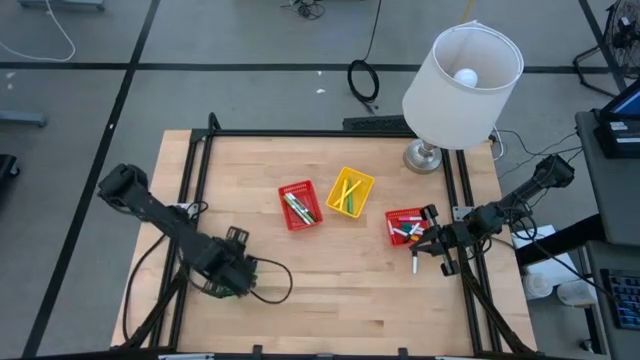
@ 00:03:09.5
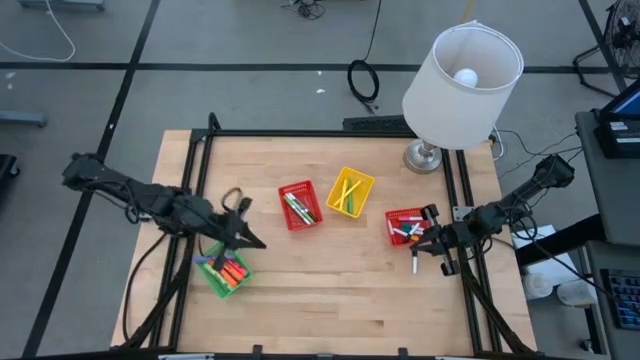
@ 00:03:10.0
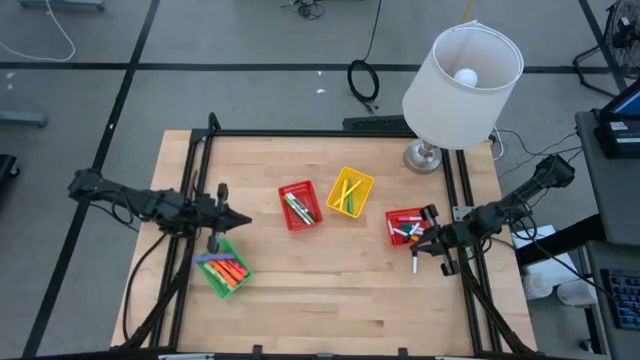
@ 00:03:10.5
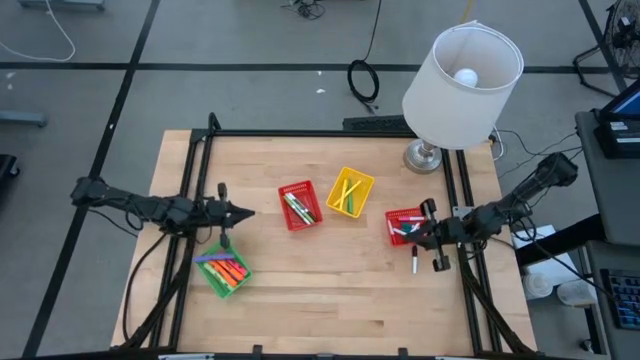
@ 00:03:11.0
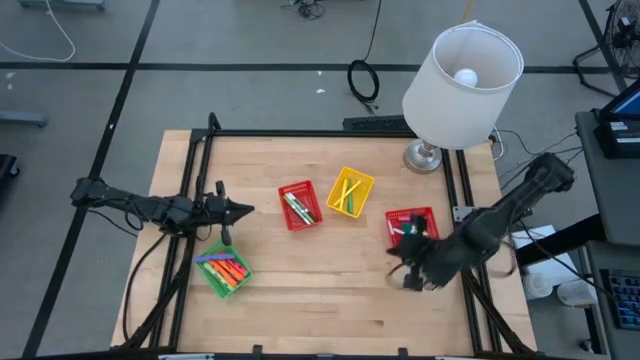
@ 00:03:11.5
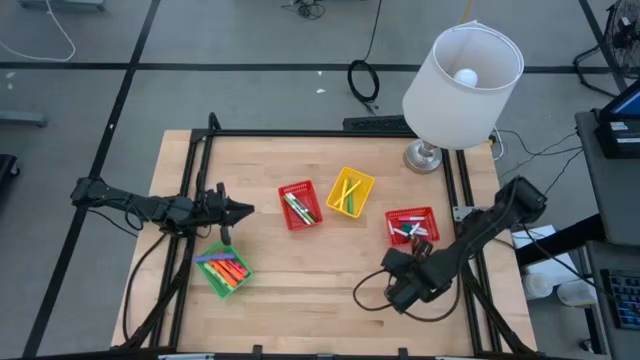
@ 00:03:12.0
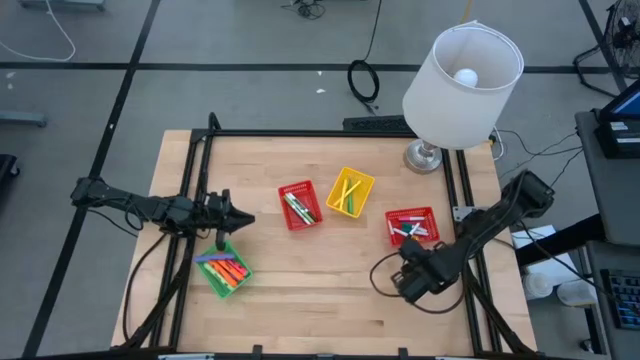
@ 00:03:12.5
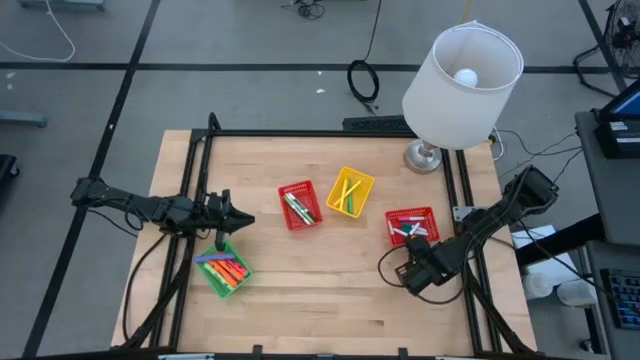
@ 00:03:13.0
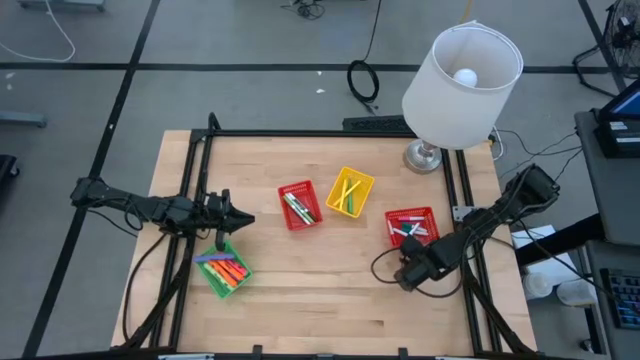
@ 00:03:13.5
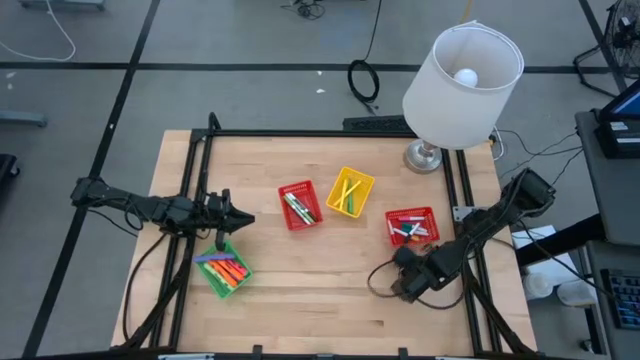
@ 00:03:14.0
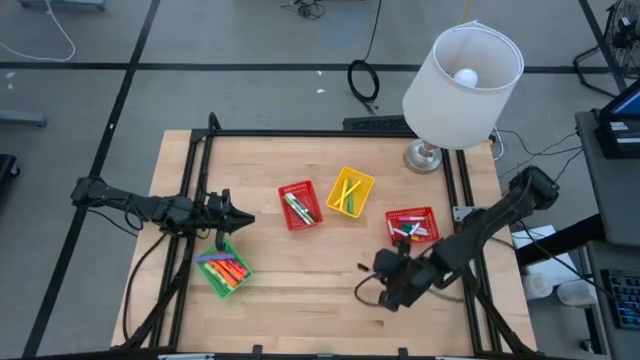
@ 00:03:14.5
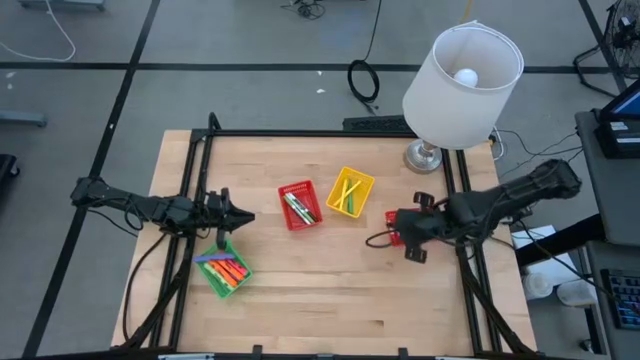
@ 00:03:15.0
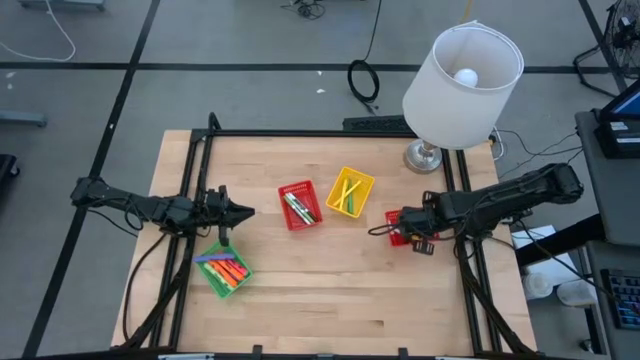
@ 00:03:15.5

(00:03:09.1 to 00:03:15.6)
Task: Pick & Place Markers
Put the small black highlighter pen into the right red bin
